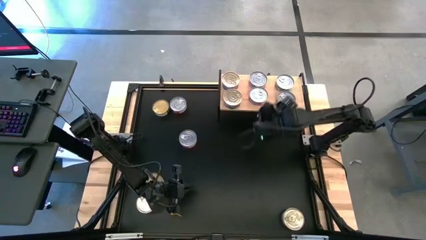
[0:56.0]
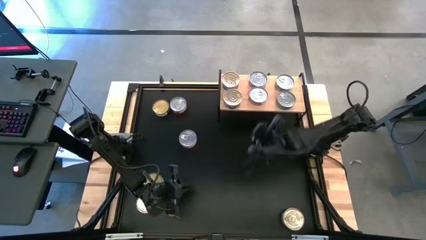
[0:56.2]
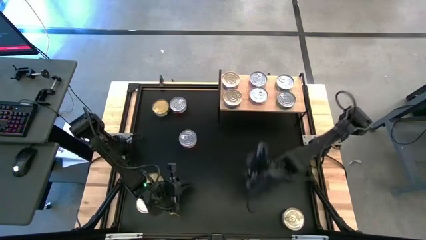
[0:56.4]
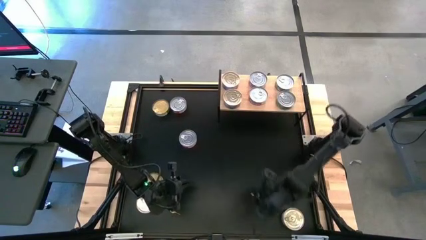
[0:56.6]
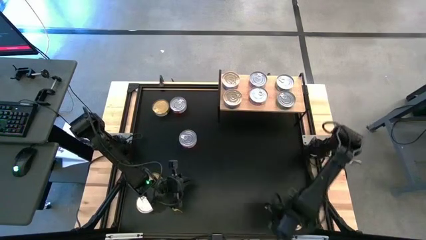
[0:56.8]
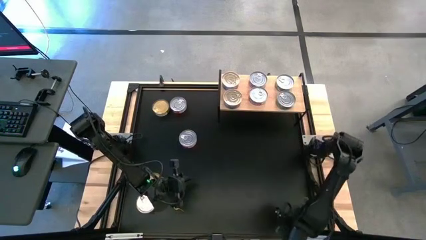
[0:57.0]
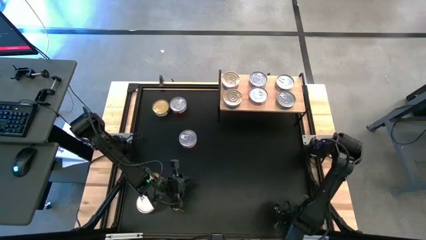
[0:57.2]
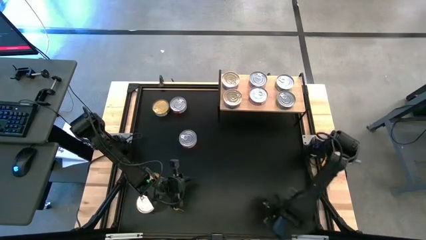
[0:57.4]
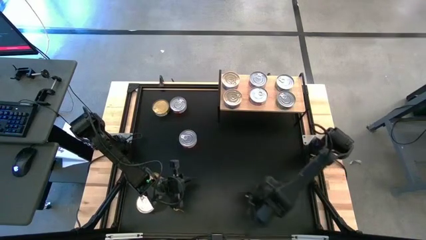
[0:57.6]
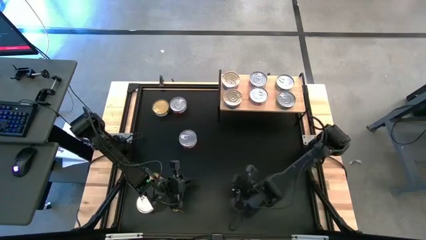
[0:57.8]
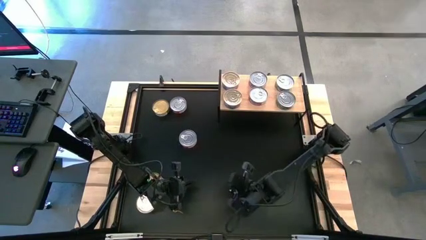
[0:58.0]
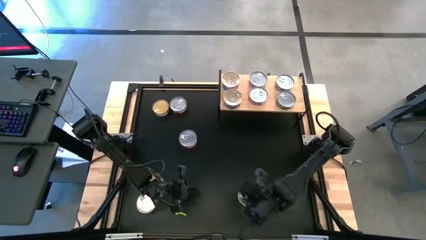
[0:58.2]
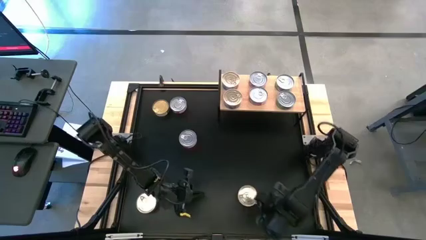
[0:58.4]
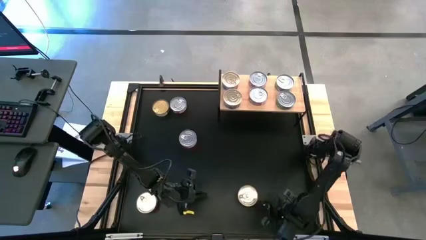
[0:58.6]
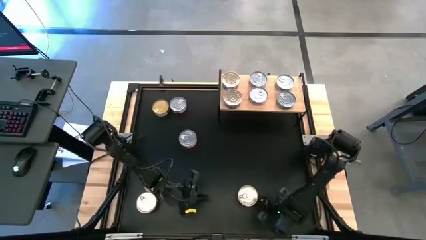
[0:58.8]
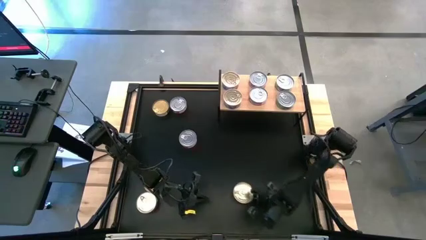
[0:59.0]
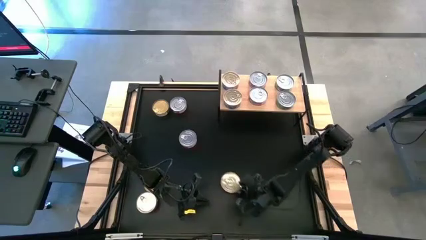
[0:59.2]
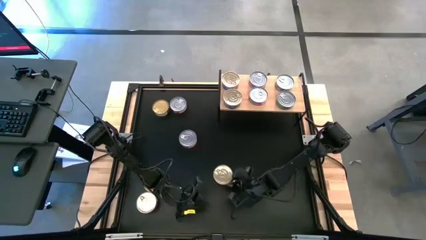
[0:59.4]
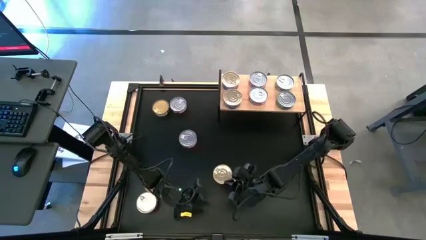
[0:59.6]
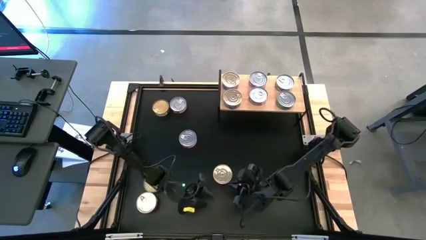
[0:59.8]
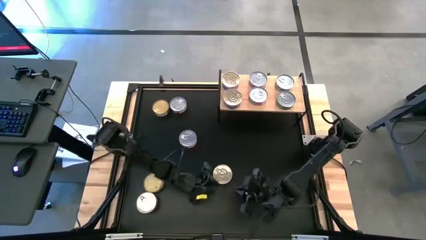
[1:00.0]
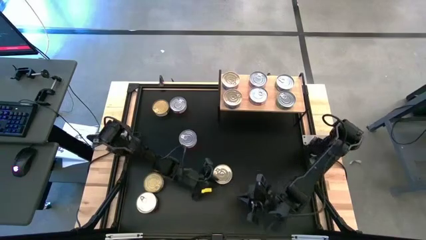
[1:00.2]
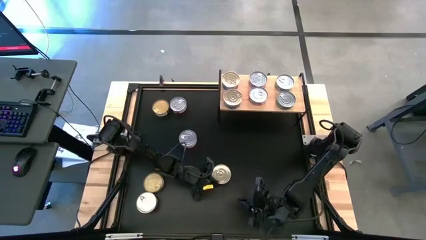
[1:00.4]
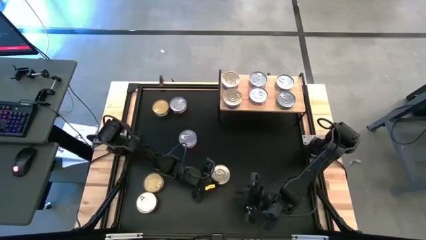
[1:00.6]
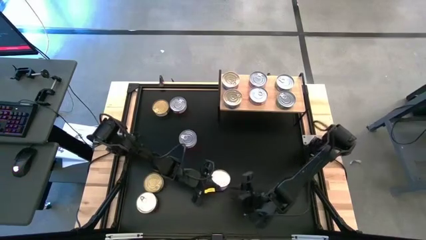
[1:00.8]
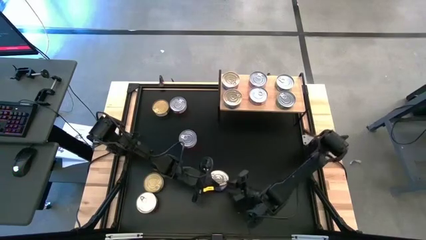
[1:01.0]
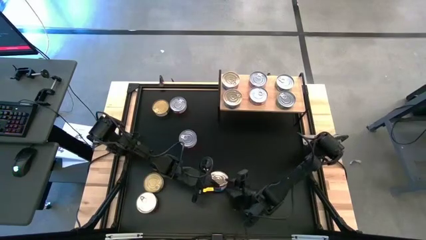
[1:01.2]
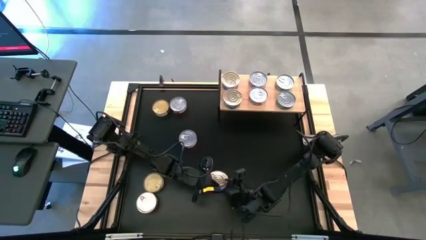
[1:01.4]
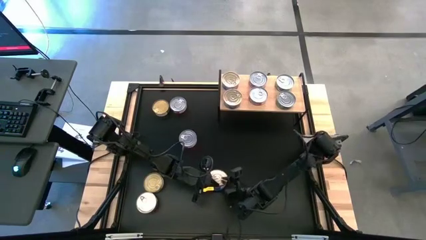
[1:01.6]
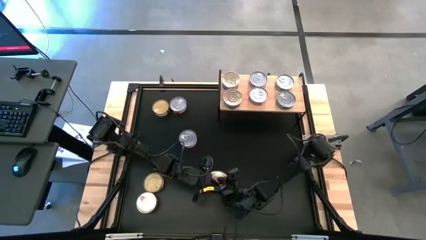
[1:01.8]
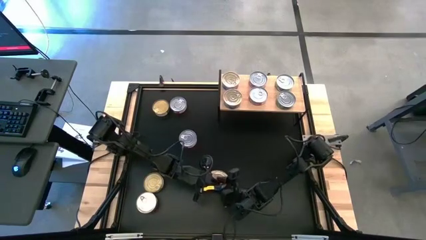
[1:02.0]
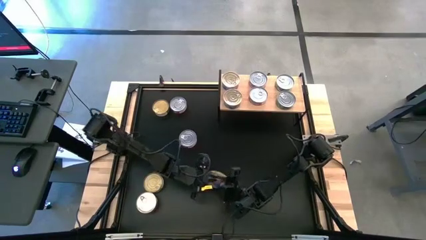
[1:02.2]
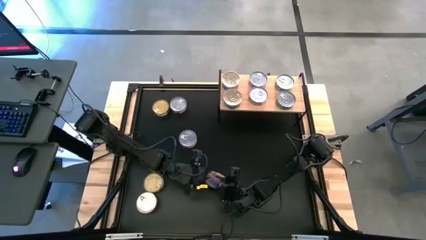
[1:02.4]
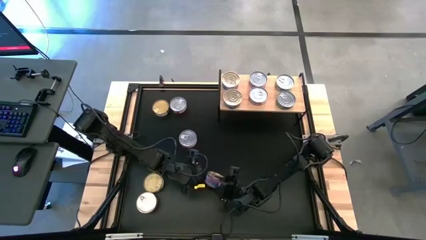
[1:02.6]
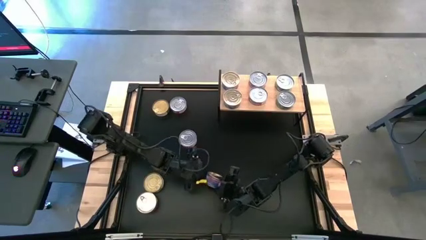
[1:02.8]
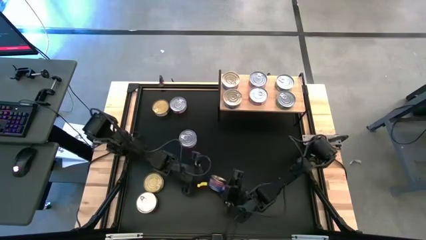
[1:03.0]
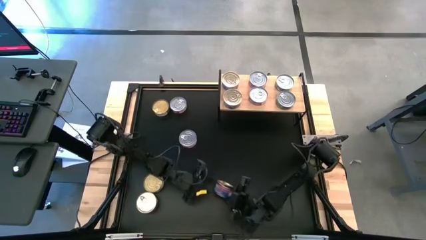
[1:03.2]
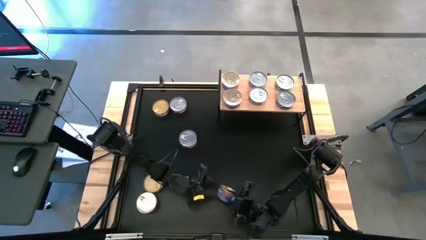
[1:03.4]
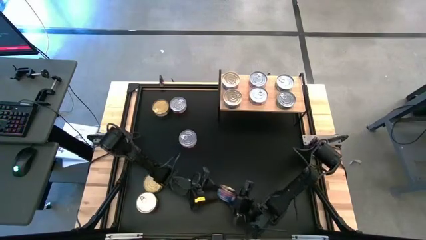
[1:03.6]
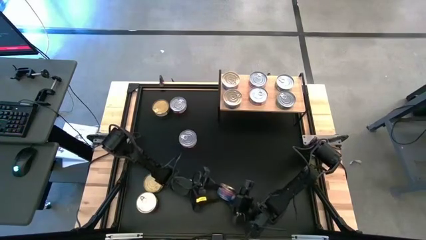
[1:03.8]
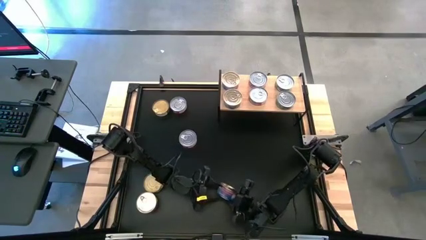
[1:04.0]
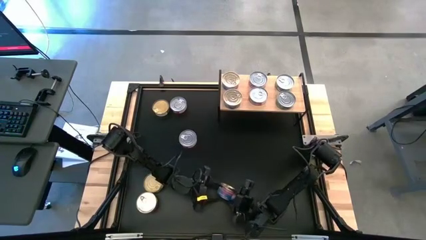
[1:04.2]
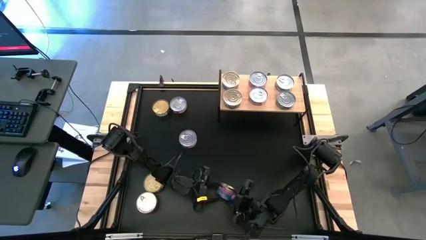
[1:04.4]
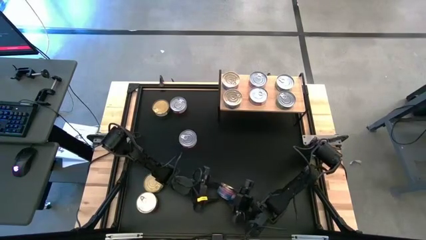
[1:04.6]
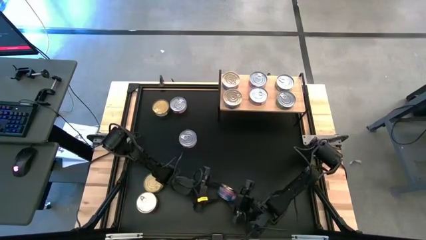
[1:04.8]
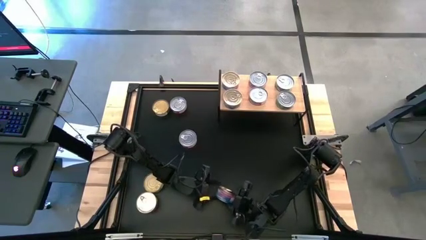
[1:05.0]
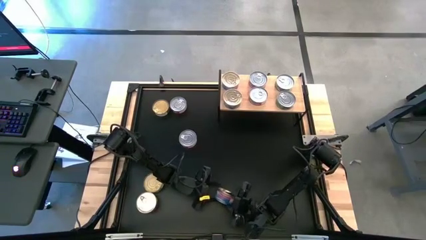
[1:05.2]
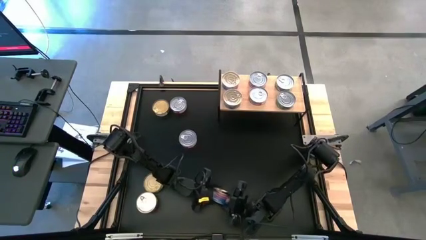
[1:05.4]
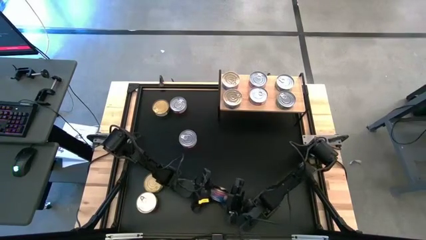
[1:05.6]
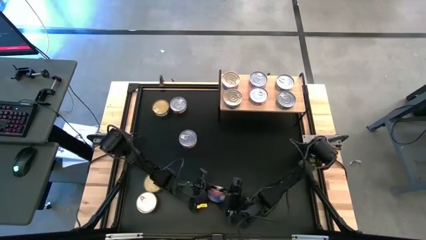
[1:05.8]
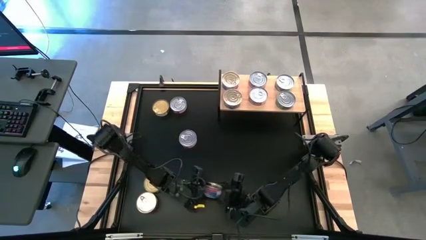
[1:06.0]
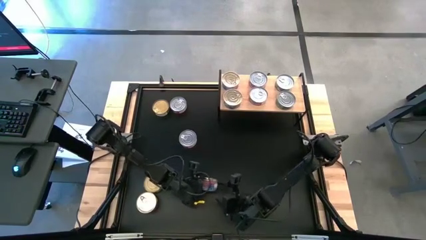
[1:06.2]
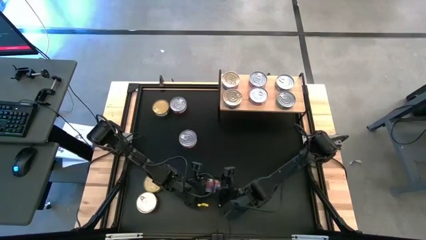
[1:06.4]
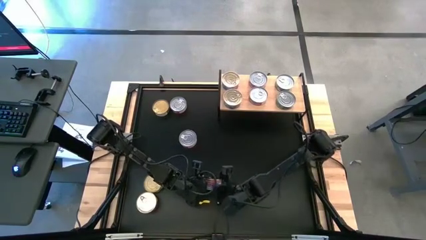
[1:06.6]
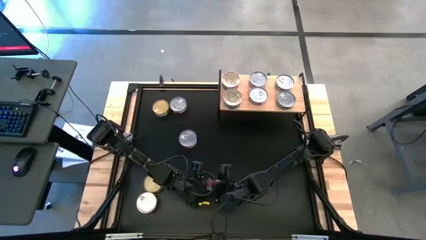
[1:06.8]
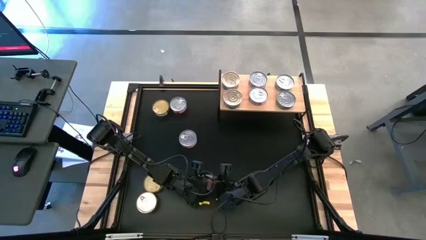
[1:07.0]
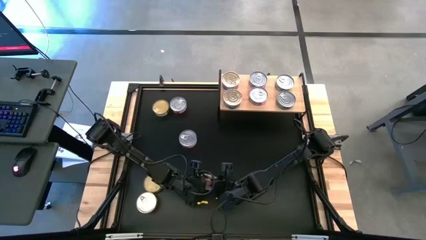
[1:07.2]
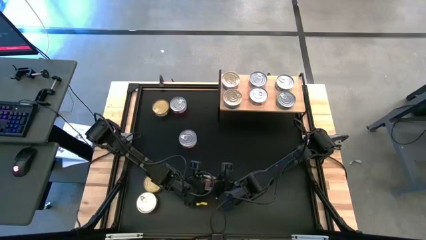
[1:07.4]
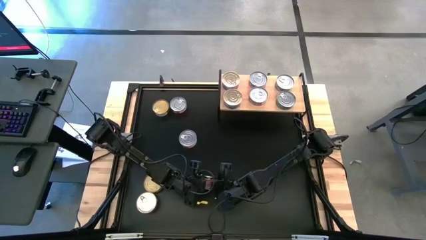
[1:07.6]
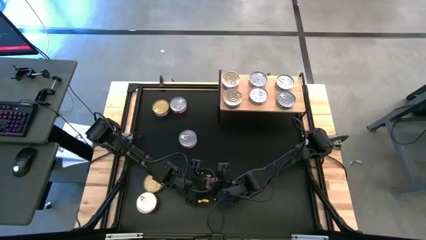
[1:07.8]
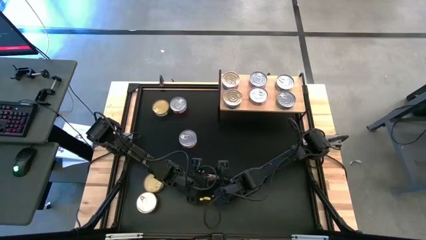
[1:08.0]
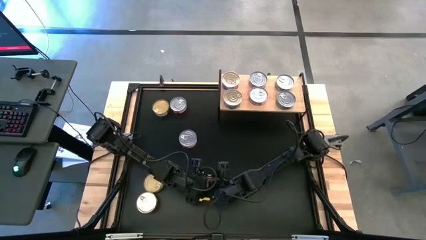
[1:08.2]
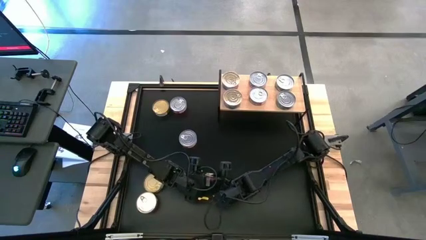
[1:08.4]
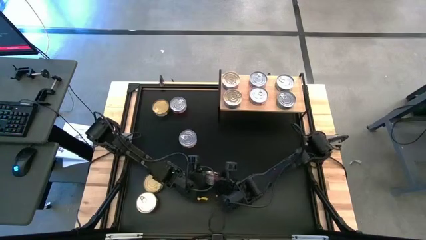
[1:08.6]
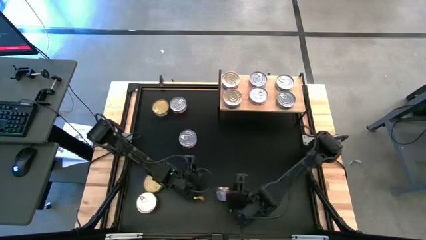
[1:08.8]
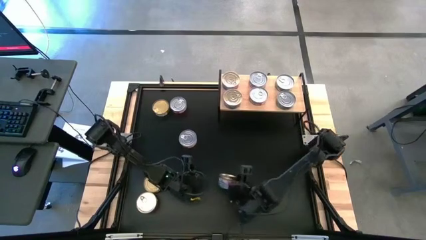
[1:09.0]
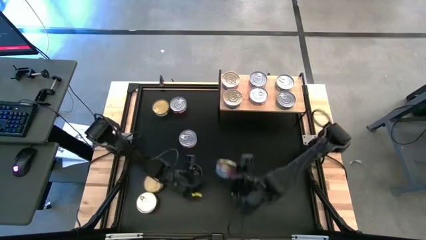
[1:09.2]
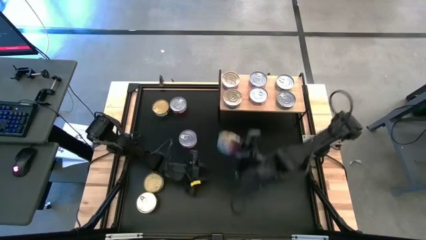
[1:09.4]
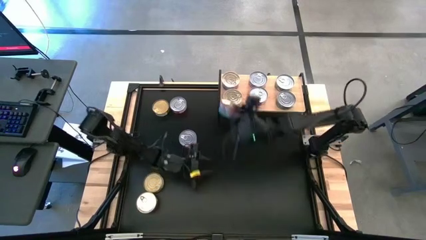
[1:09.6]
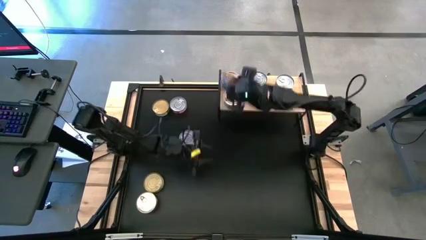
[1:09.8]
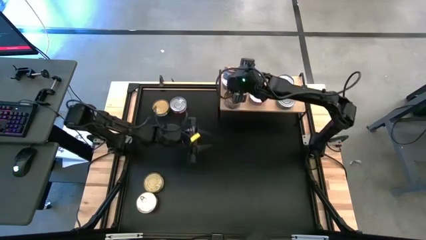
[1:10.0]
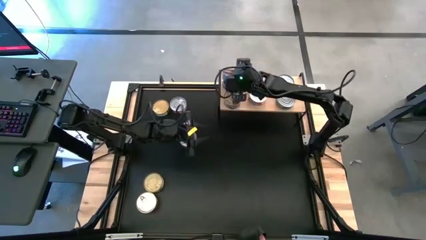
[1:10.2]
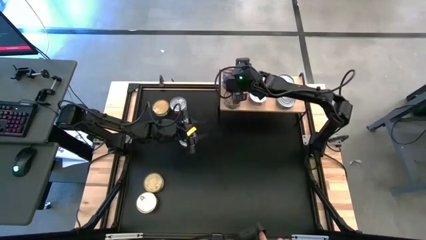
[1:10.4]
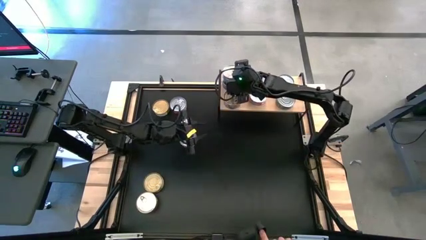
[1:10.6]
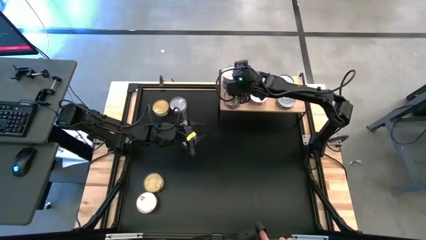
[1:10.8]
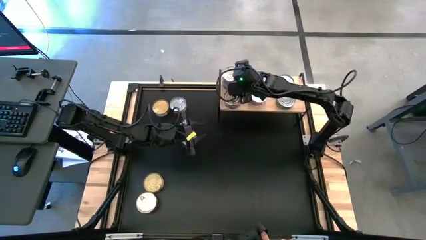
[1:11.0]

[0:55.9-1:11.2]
Task: Stack canned seafood by type on shelf
Stack the blue tuna can on top of the other blue tuna can on the shelf
